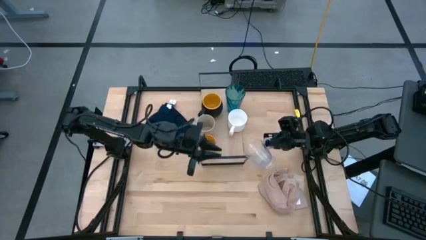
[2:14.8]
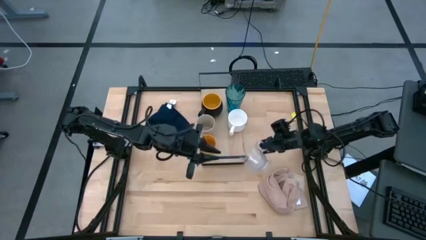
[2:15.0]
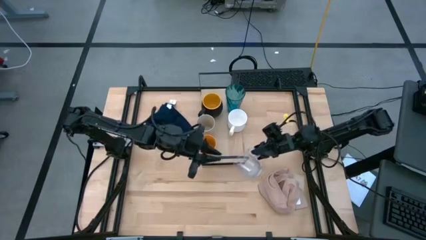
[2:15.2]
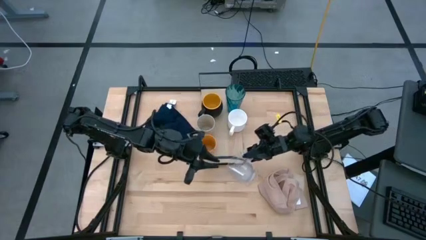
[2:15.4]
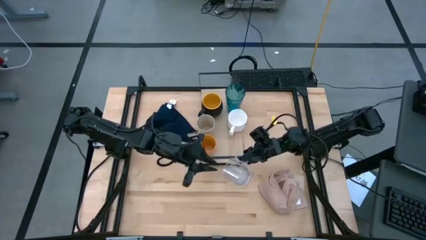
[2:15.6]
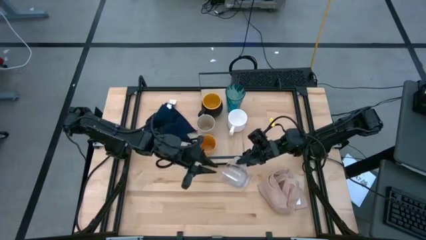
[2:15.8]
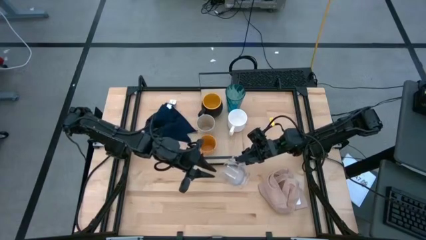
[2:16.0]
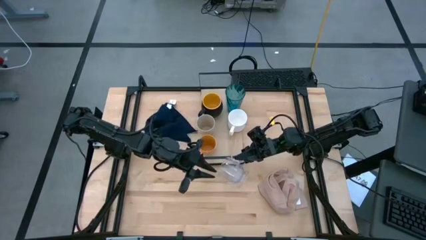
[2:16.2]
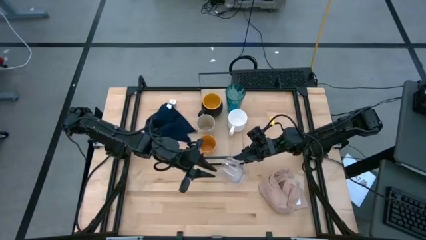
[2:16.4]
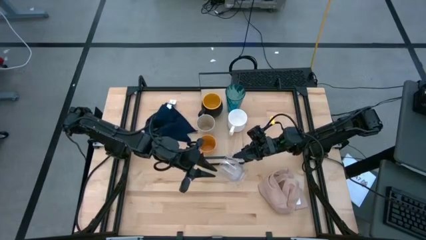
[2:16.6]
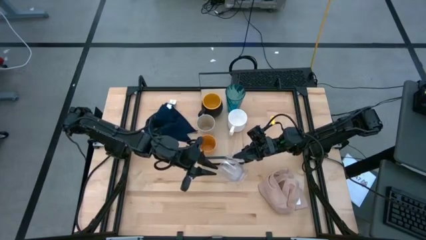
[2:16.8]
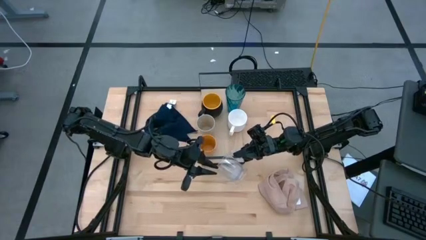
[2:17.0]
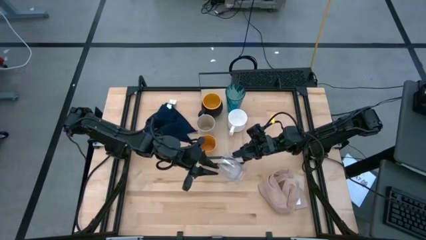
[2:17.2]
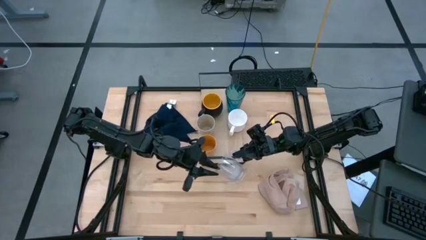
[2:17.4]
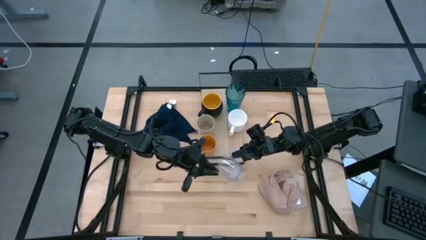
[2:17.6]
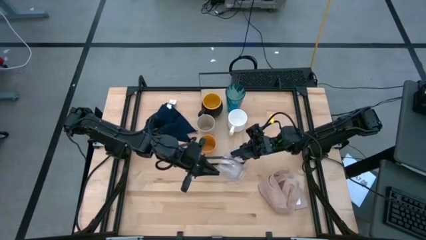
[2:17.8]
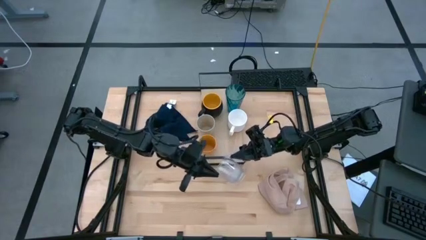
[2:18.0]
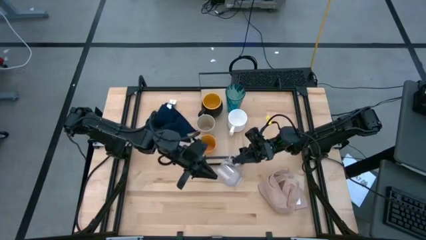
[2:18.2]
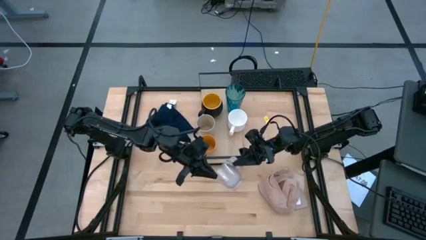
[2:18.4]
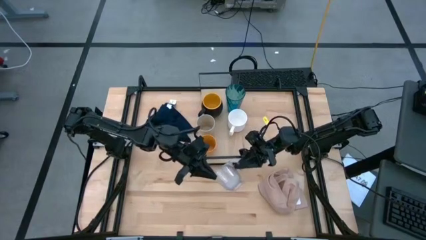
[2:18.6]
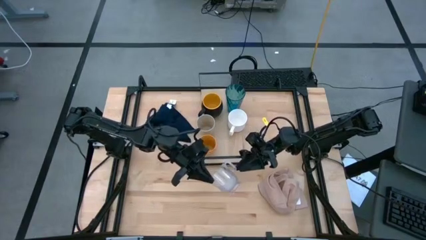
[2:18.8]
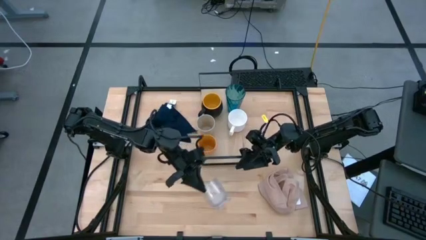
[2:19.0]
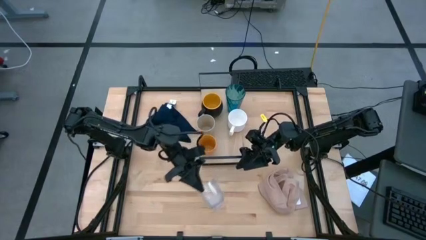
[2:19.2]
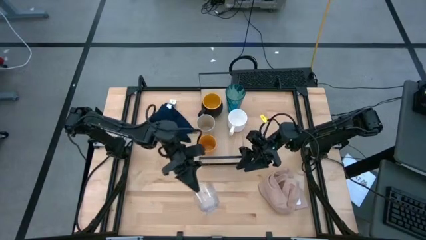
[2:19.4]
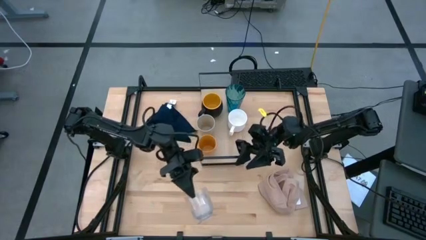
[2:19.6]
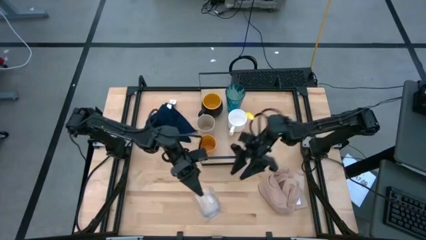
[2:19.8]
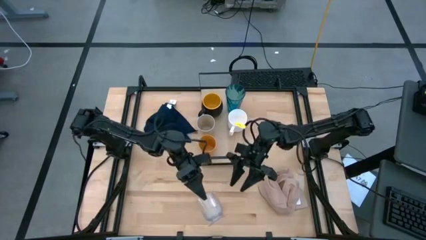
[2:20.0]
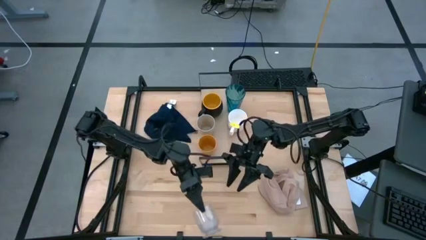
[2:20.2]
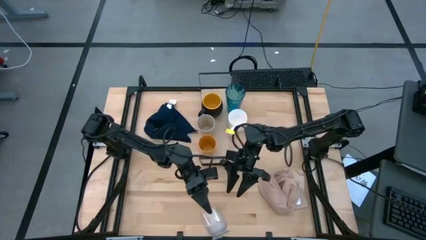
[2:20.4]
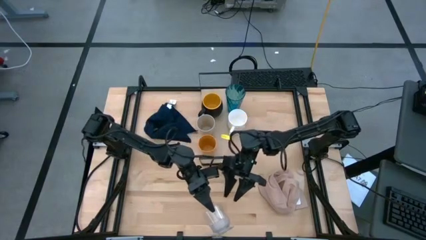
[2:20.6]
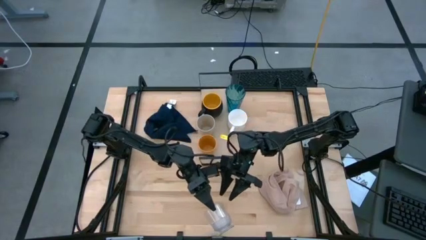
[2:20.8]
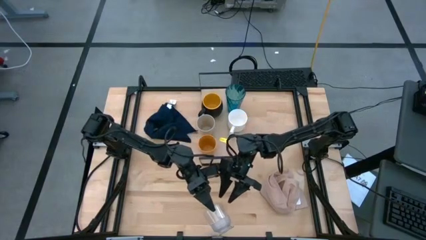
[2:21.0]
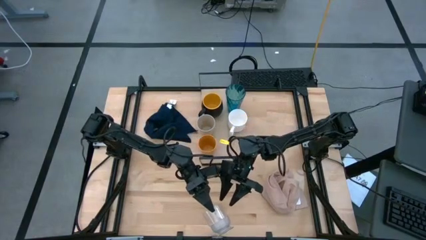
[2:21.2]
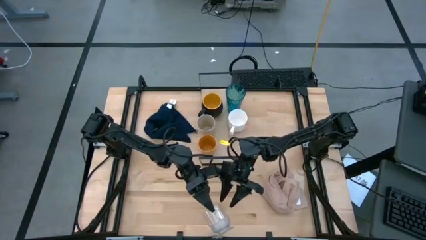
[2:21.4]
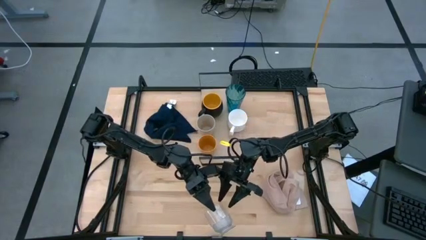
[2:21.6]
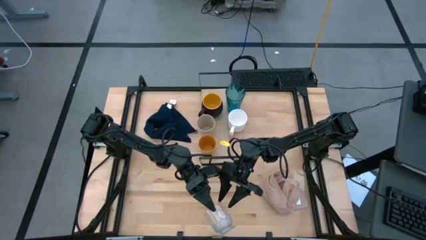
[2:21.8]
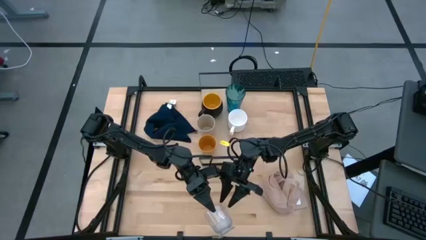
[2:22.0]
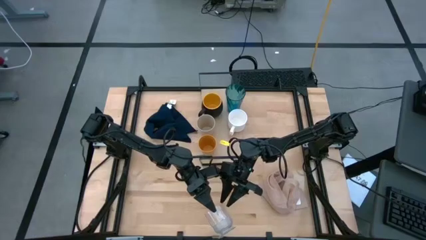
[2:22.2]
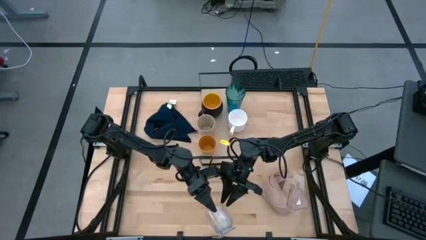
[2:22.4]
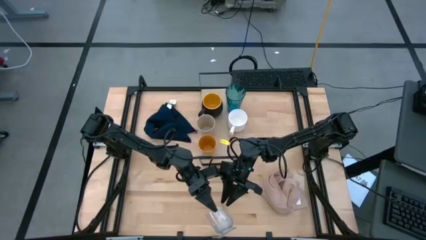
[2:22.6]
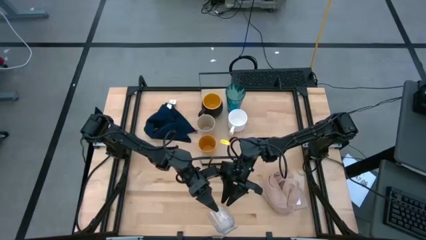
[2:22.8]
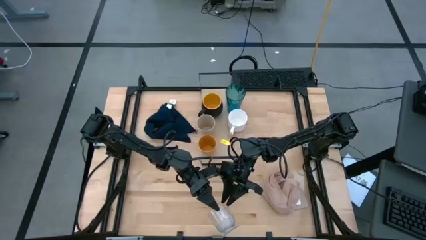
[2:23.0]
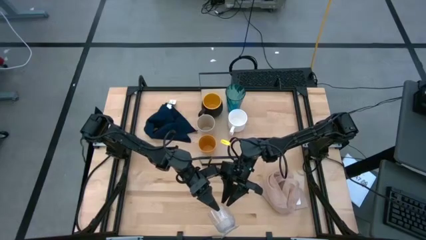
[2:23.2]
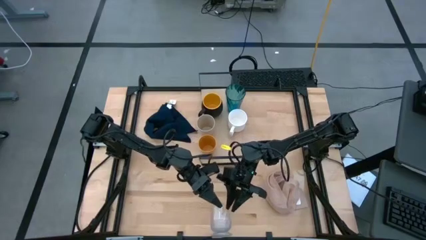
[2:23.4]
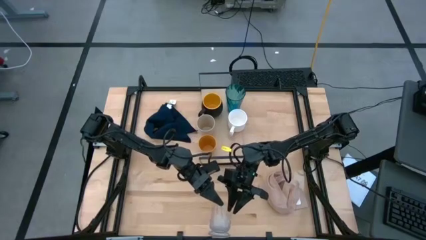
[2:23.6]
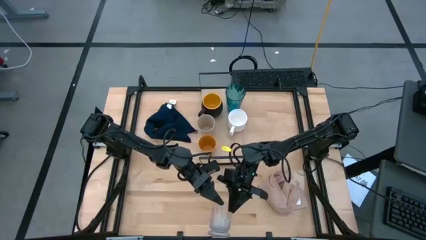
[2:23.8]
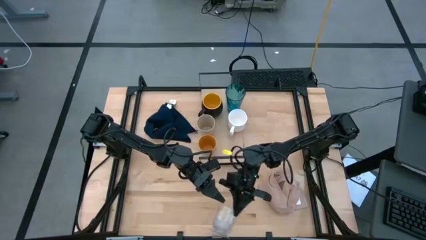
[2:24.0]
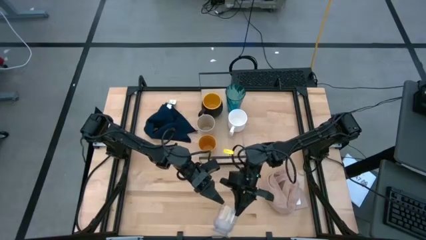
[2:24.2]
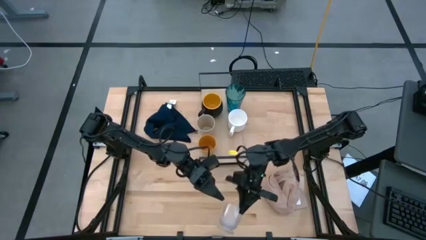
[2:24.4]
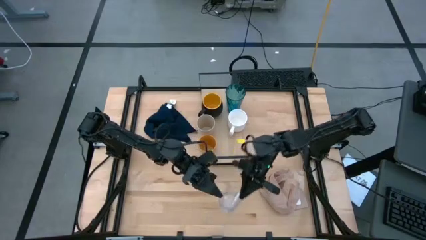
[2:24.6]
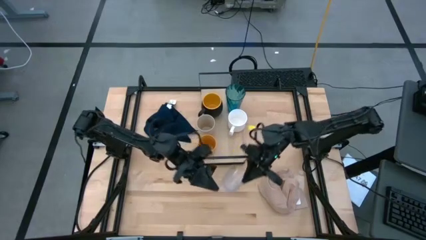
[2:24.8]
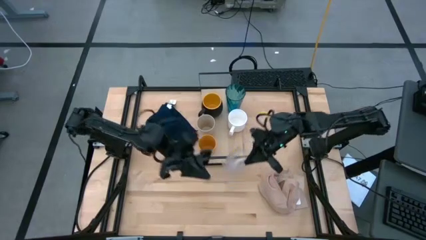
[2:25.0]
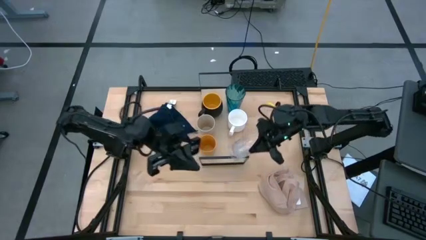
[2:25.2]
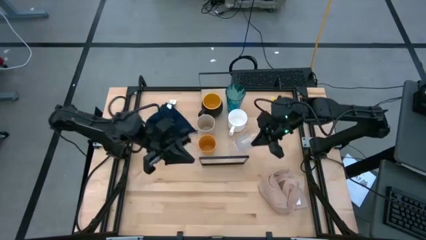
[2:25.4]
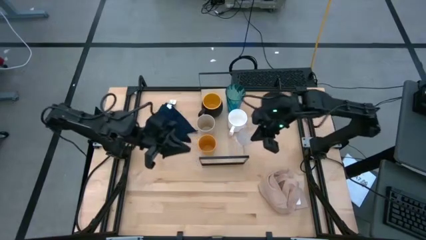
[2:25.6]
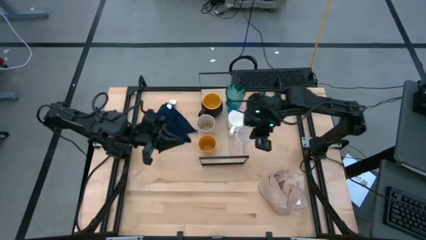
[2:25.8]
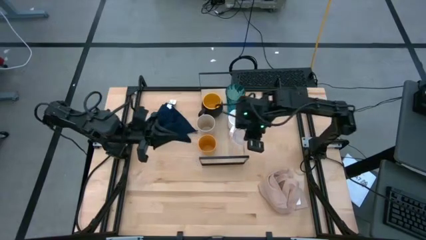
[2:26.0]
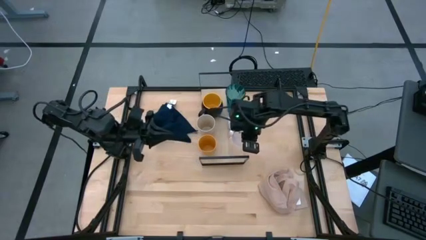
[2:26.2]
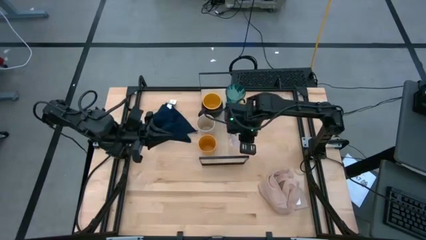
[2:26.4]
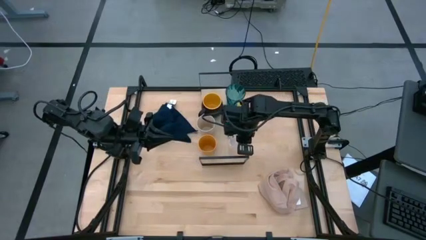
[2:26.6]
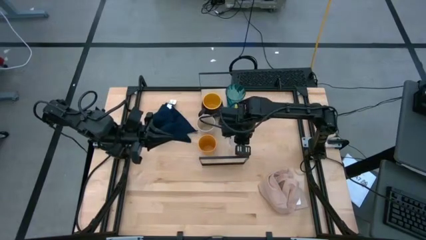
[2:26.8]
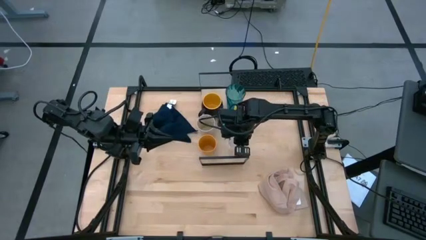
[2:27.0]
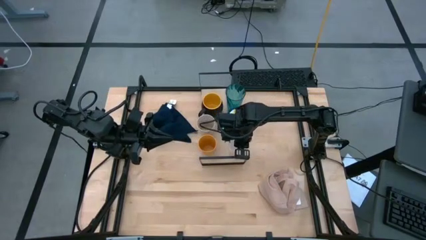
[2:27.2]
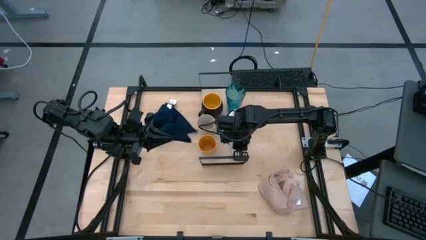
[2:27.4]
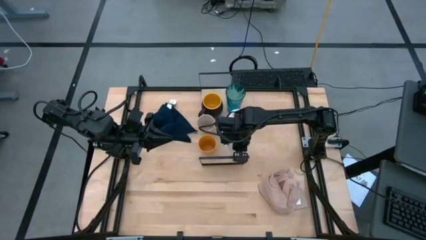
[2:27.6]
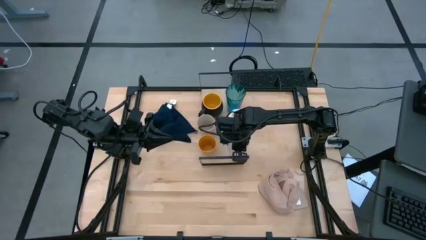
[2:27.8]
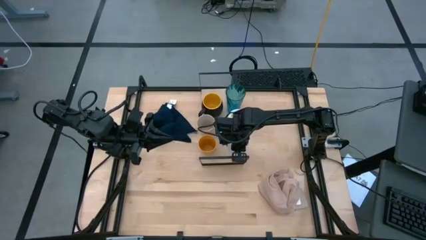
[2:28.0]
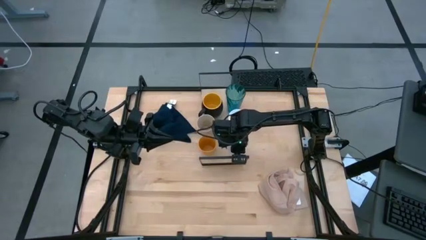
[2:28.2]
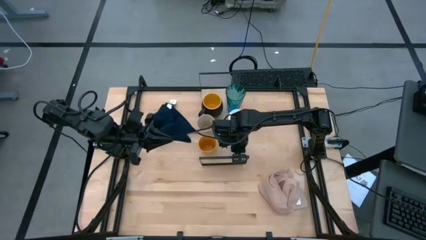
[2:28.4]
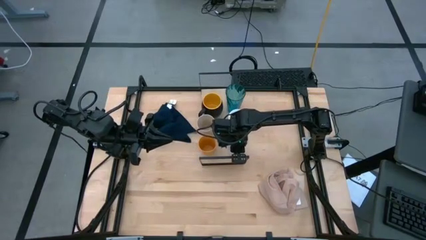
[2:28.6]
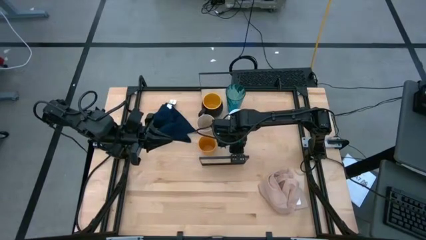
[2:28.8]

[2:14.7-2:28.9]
Task: Stack small to large cups/mugs on shelf
Put the transparent mug on the shelf

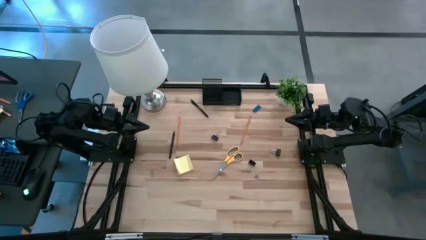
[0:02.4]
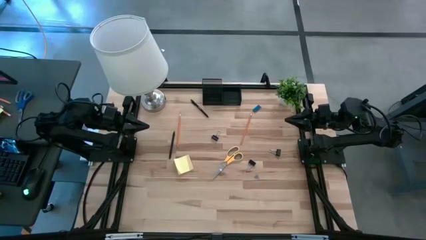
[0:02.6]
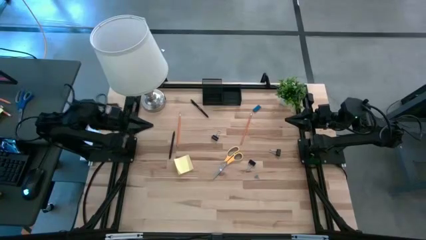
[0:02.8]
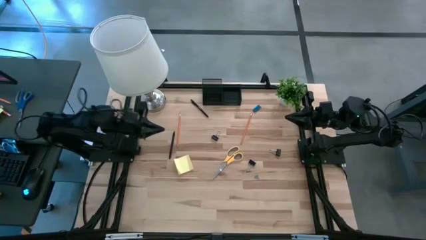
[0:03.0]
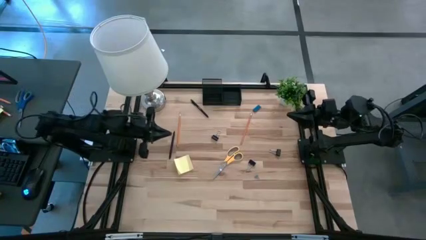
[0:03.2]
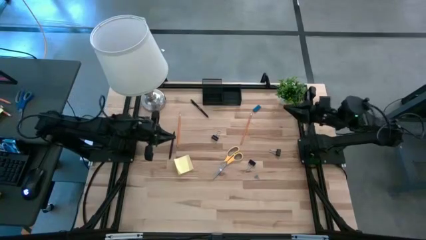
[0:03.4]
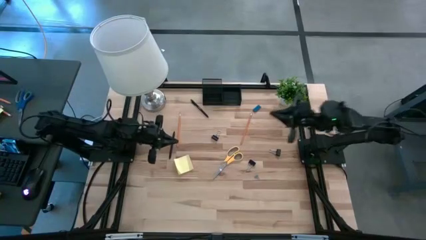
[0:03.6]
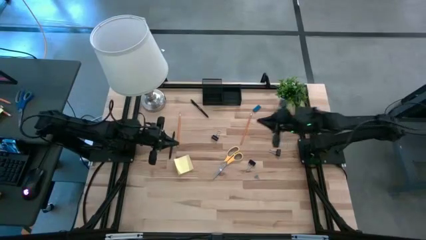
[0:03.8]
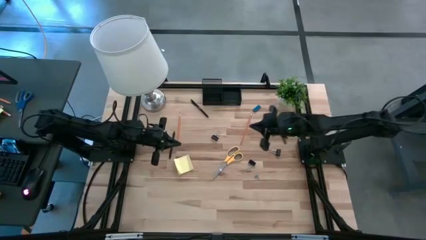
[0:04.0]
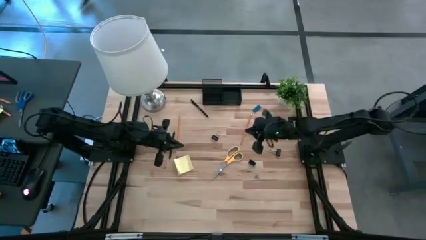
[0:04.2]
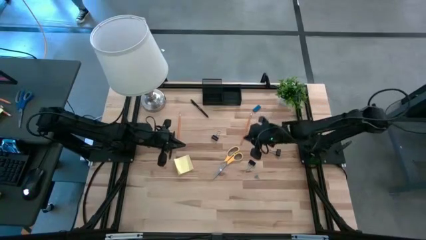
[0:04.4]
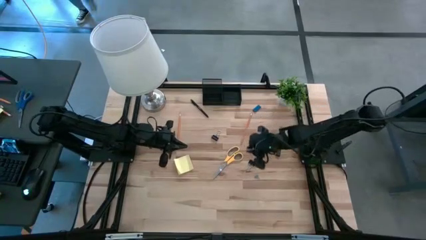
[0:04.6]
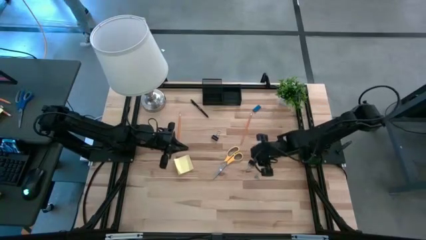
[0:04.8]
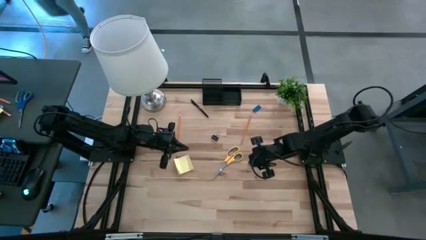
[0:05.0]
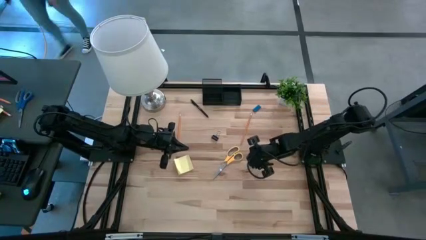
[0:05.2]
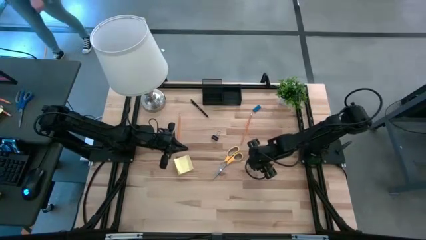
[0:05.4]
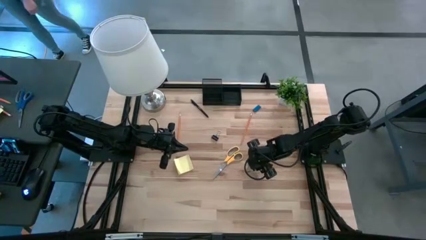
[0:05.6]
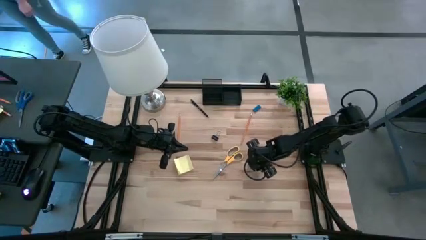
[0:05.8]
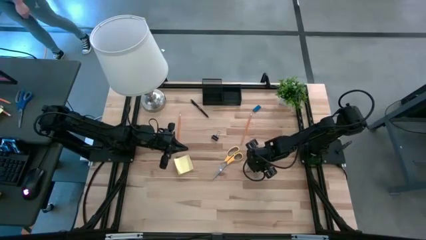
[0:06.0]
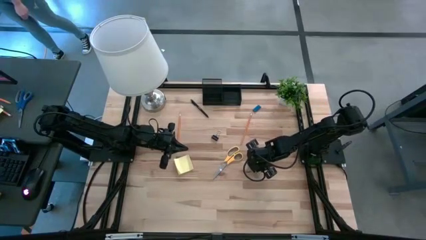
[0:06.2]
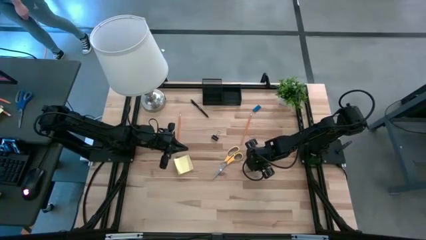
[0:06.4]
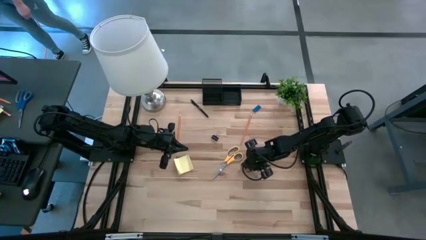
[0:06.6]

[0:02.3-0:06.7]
Task: Pick and place office supplies into organizer
Put the middle black binder clip into the desk organizer
